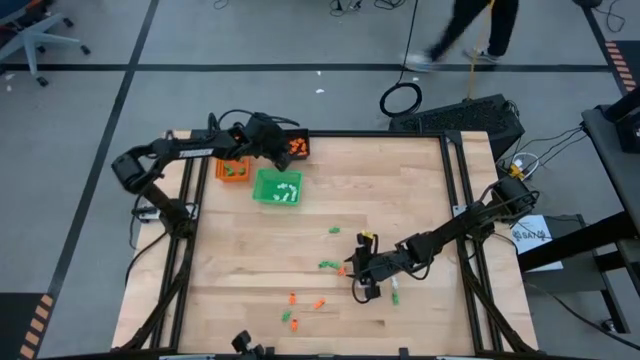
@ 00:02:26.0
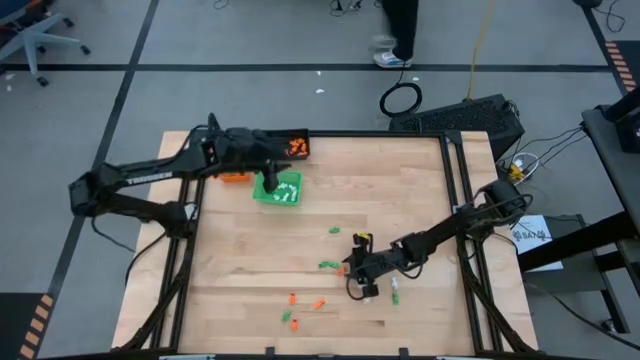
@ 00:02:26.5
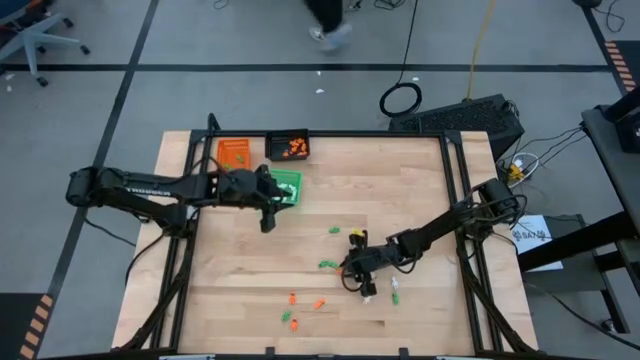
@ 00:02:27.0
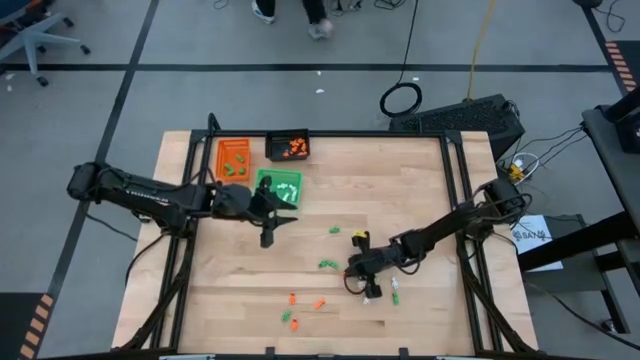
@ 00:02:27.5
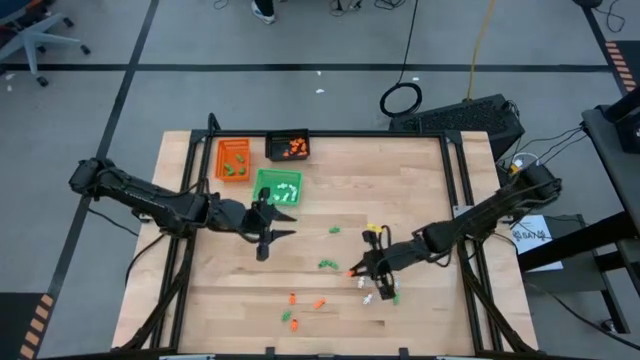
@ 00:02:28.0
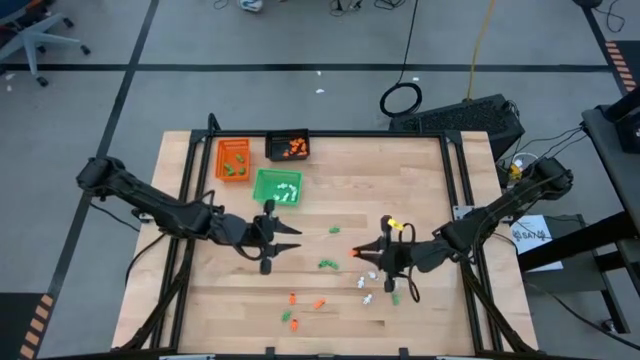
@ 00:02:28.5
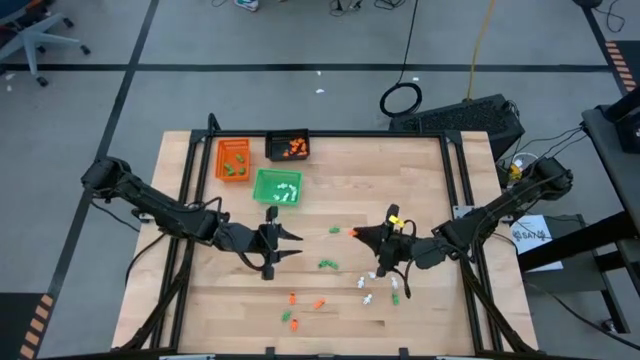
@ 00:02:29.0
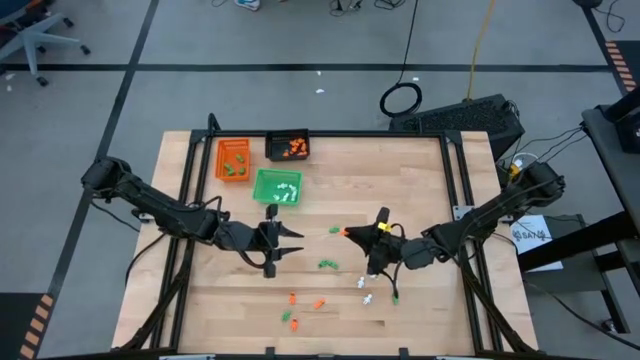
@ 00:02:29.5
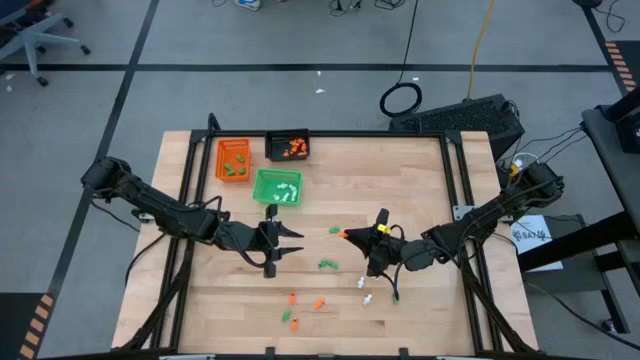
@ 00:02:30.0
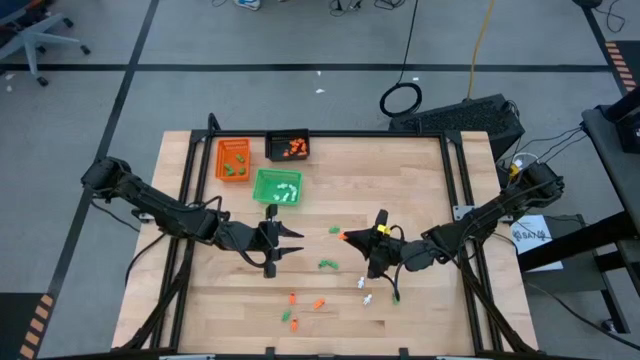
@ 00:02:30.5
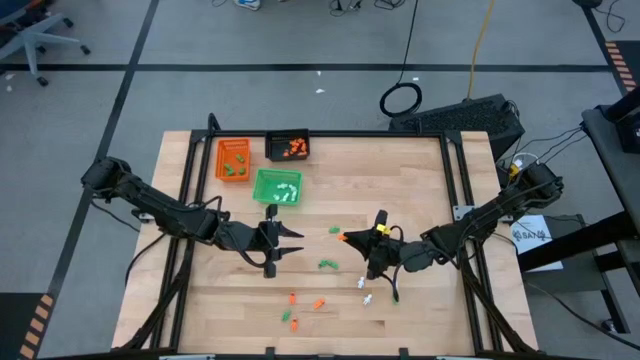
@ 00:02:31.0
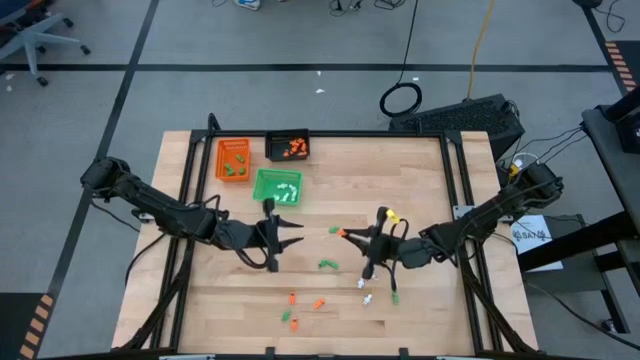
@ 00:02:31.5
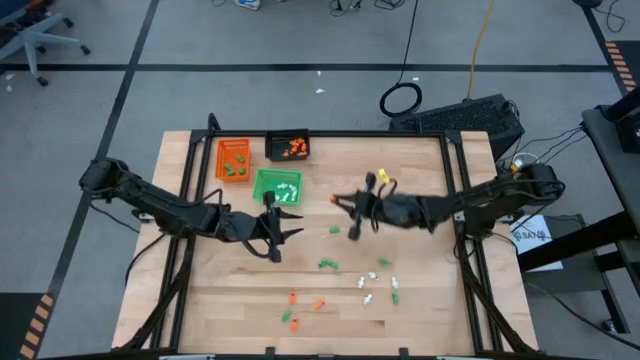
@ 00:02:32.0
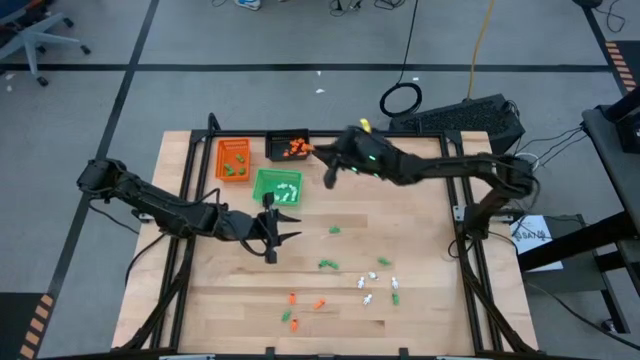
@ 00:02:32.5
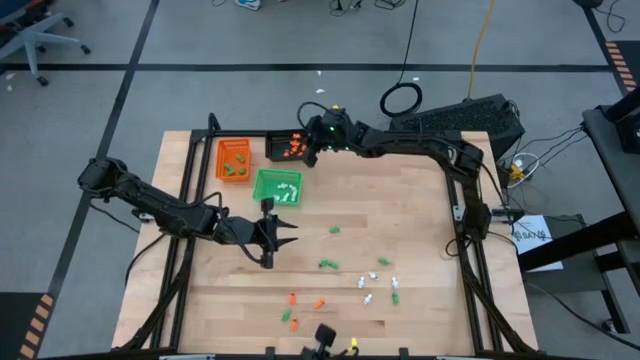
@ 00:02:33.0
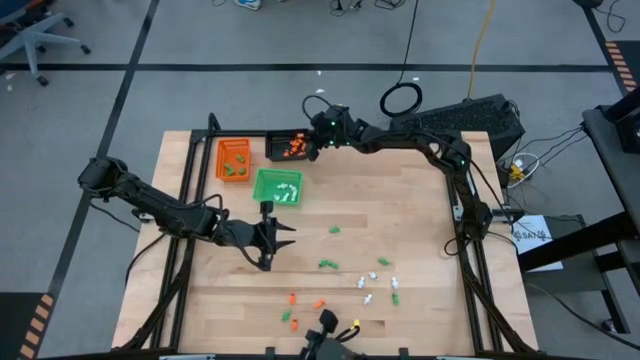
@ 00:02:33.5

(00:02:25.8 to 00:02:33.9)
Task: Sort Halloween decoration
Put the orange skeleton toy into the black bin

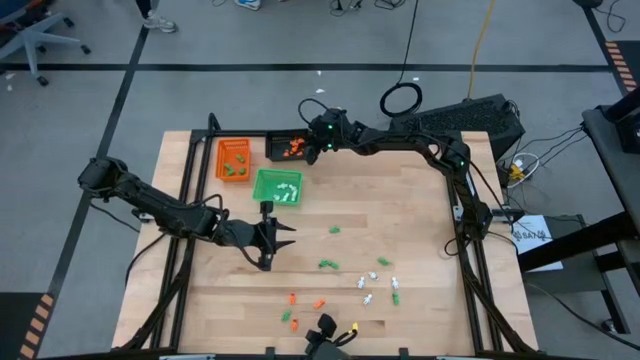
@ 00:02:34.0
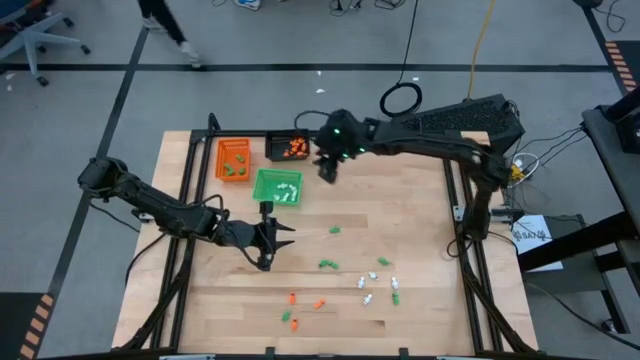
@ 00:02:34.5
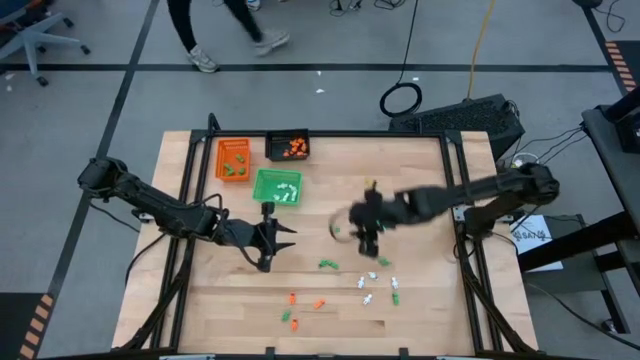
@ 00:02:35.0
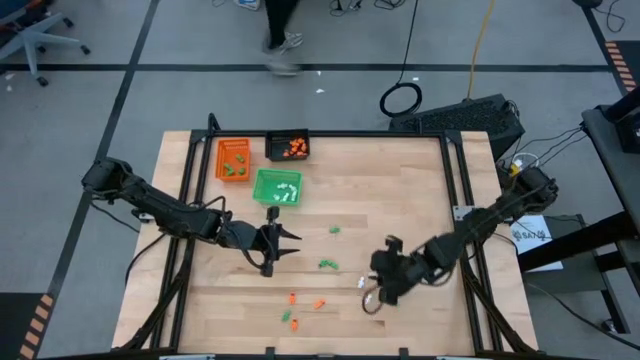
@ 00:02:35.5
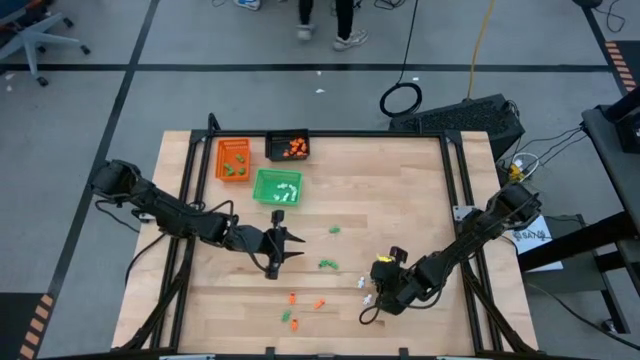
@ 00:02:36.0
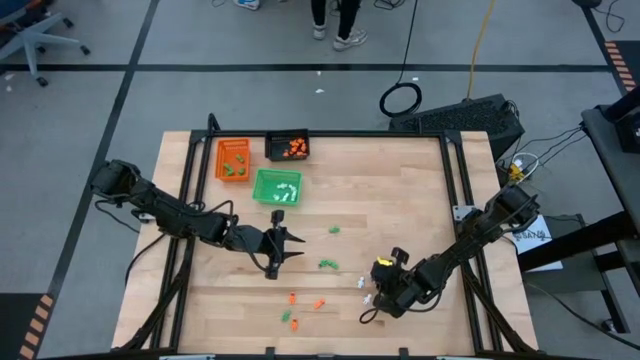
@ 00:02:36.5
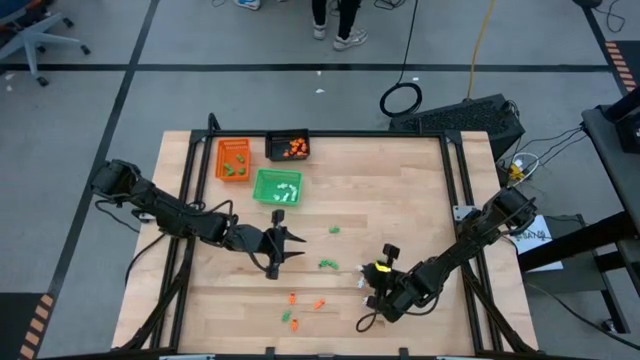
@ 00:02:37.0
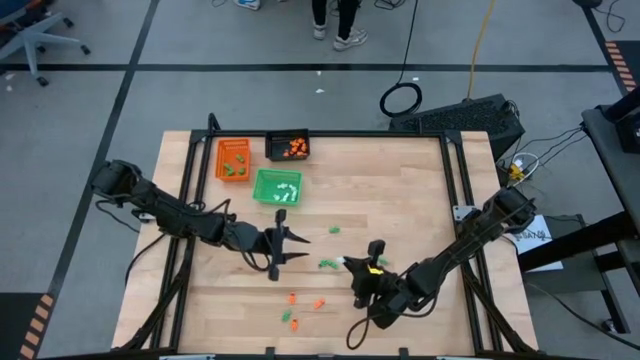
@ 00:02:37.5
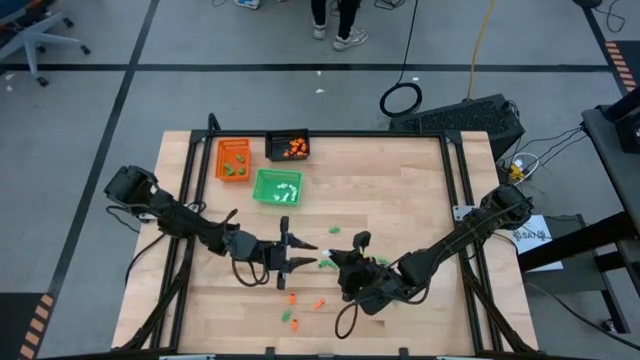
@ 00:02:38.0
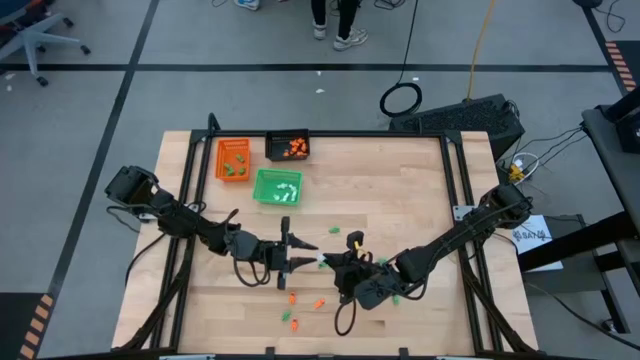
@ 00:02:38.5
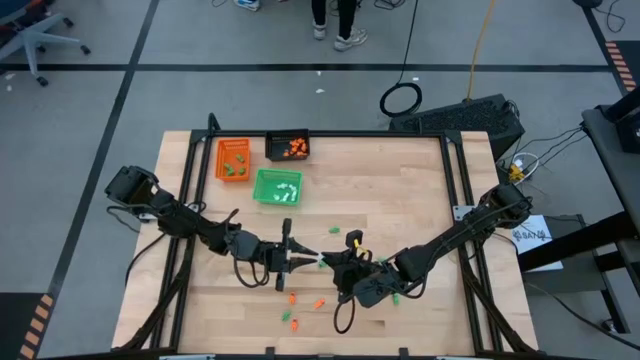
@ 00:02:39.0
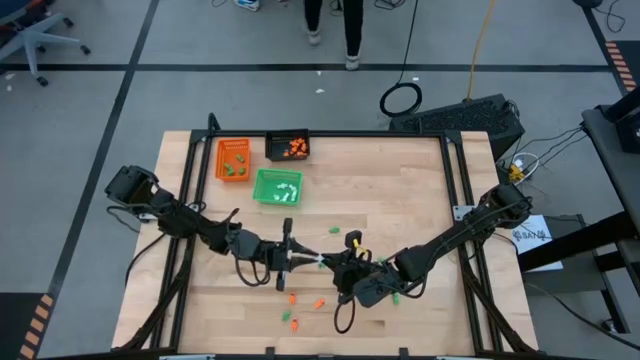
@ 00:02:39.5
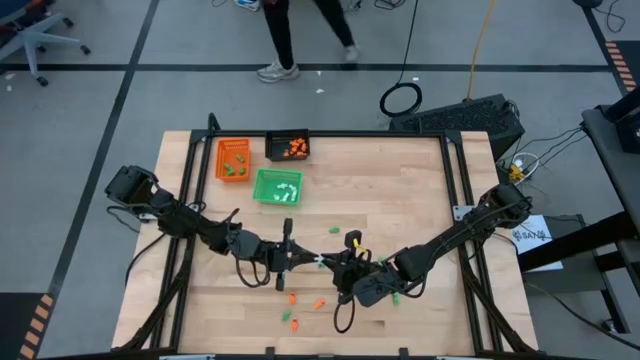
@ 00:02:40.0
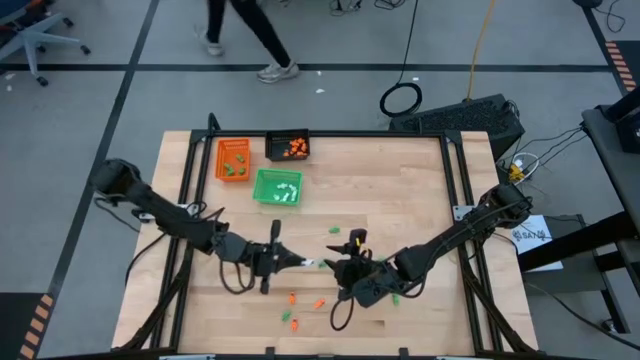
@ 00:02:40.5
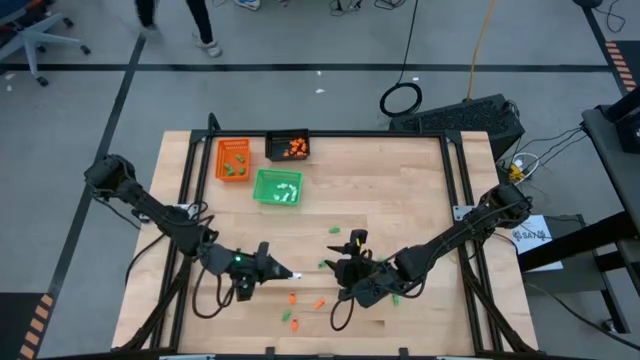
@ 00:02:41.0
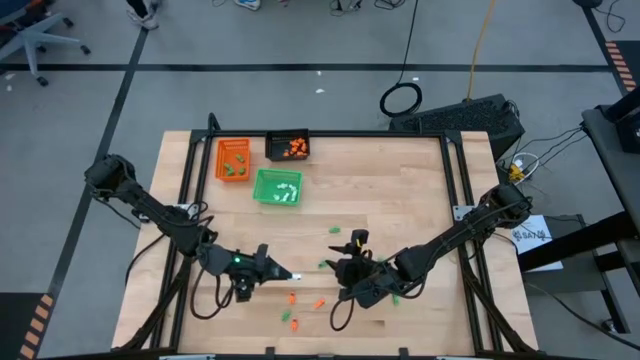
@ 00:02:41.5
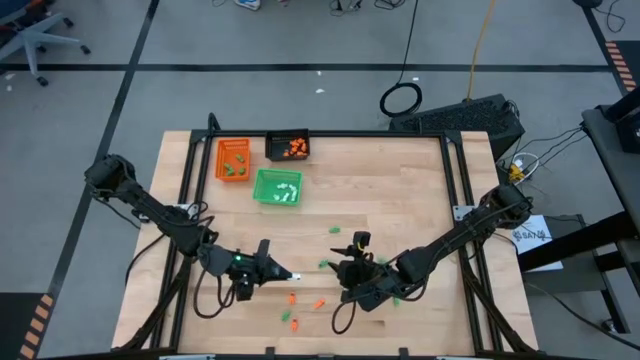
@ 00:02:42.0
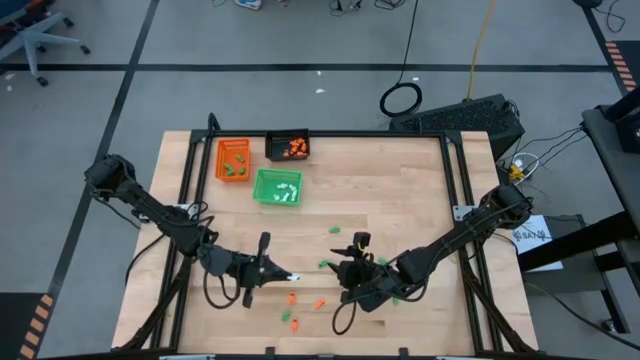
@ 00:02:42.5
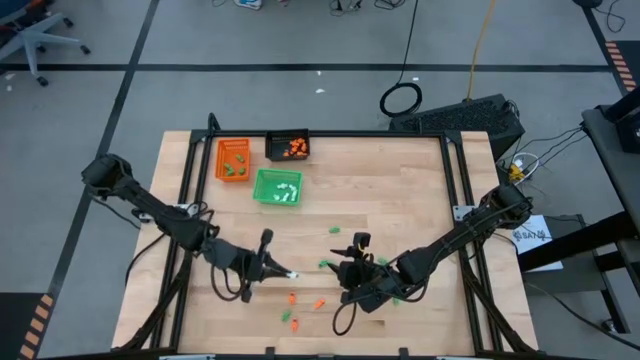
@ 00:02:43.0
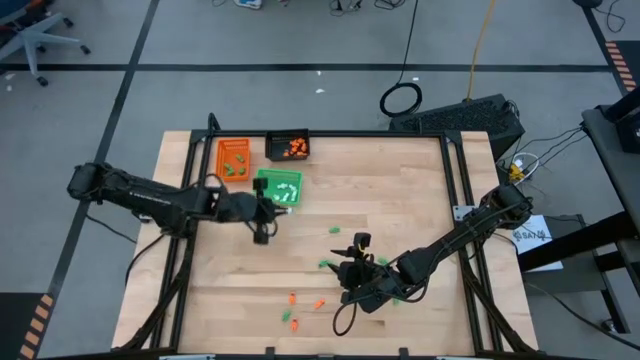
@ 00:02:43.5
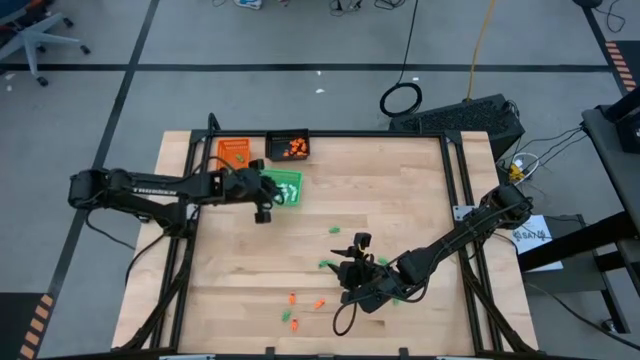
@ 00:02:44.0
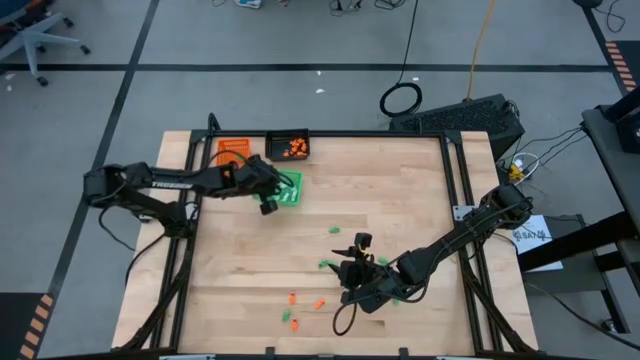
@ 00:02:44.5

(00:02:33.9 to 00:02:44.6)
Put the white skeleton toy into the green bin

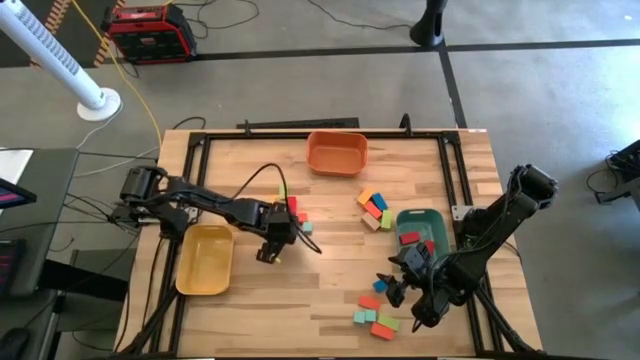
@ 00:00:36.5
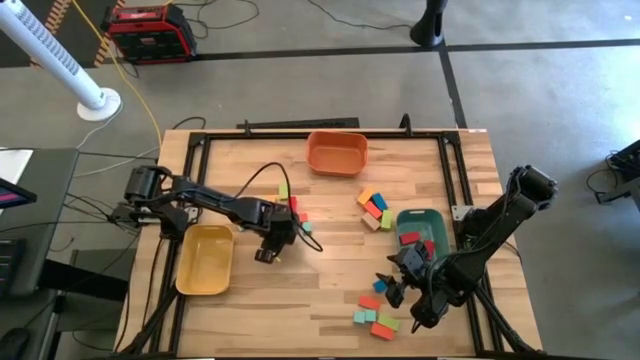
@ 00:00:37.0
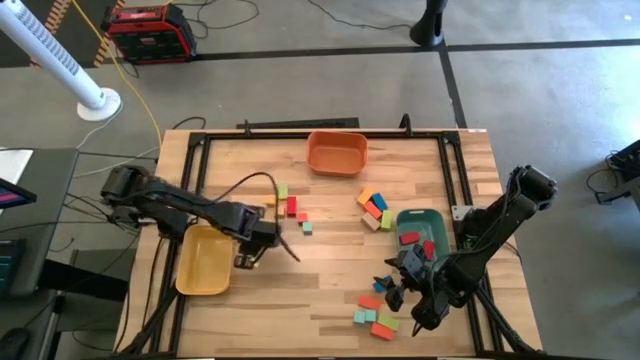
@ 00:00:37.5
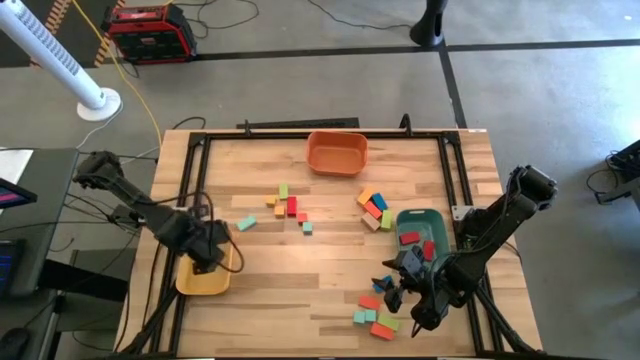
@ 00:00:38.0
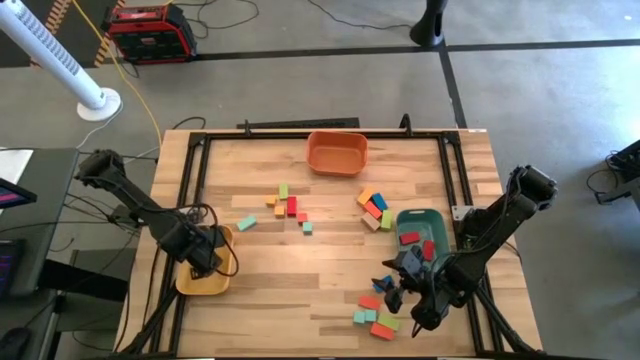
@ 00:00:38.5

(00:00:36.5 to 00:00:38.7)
Task: Sort blocks by size
Put the small orange block into the yellow bin
